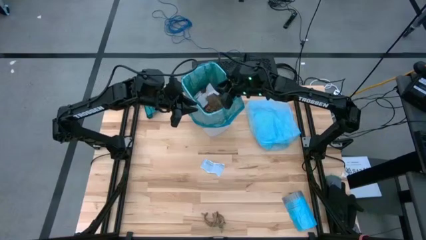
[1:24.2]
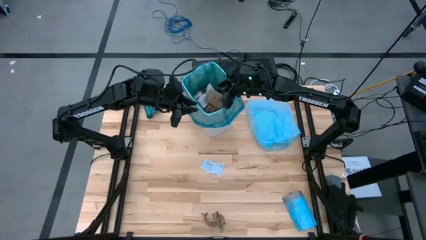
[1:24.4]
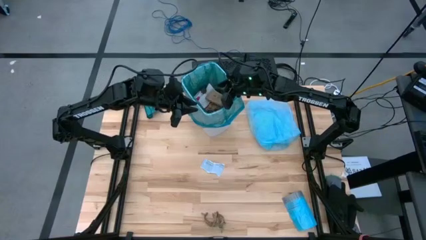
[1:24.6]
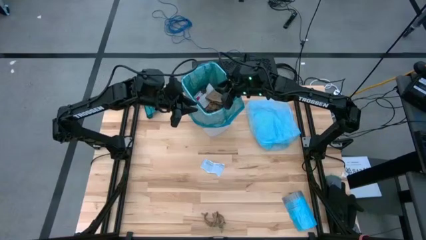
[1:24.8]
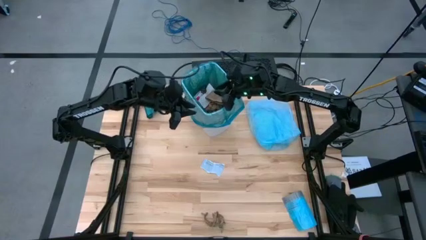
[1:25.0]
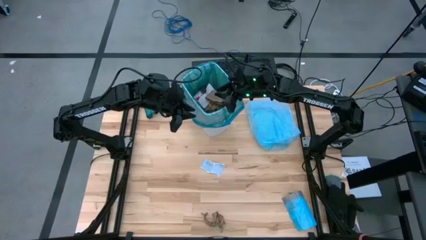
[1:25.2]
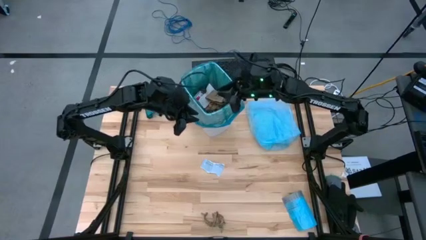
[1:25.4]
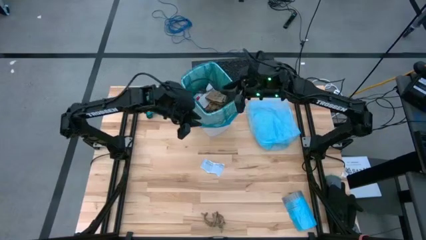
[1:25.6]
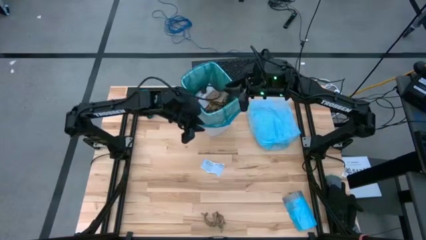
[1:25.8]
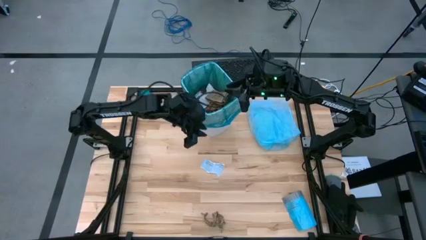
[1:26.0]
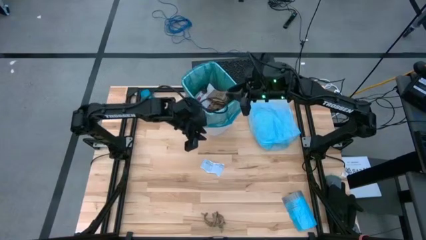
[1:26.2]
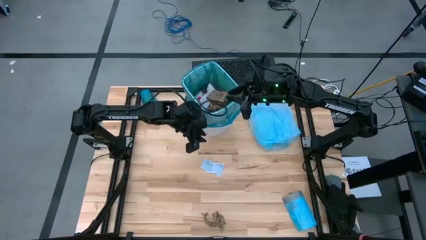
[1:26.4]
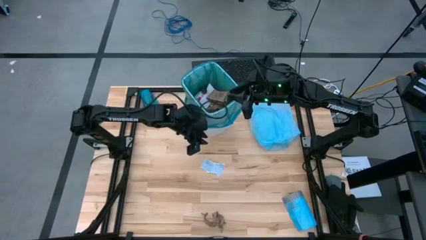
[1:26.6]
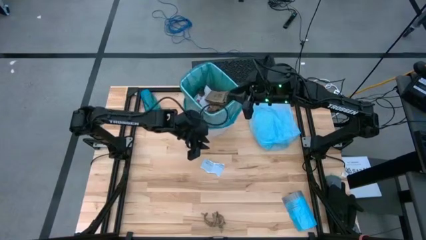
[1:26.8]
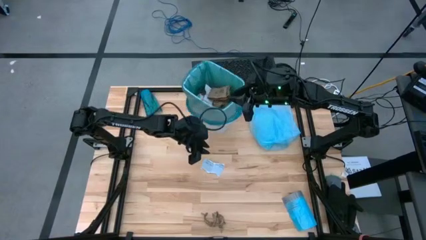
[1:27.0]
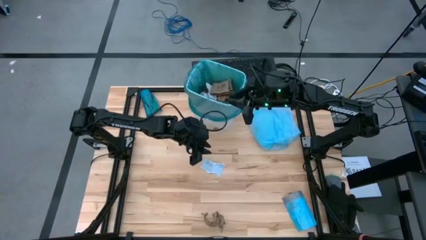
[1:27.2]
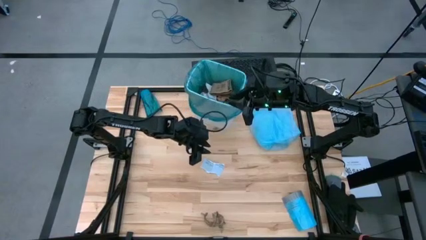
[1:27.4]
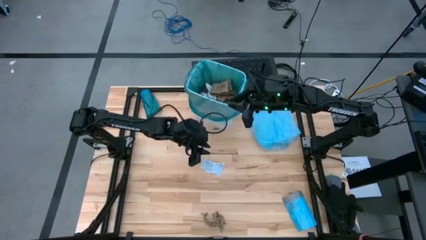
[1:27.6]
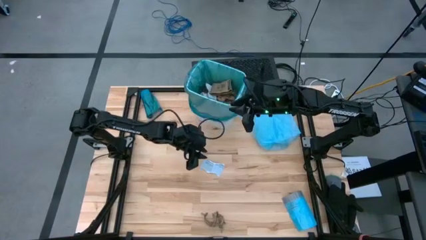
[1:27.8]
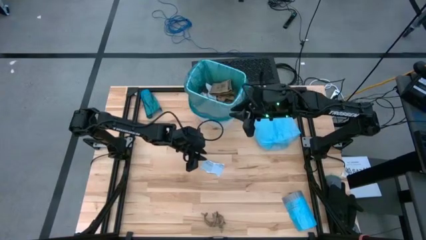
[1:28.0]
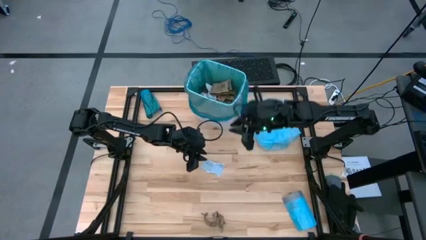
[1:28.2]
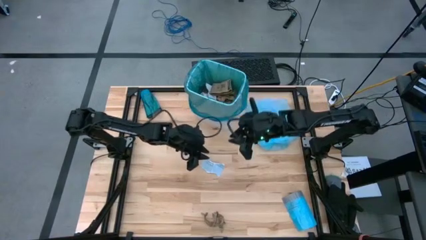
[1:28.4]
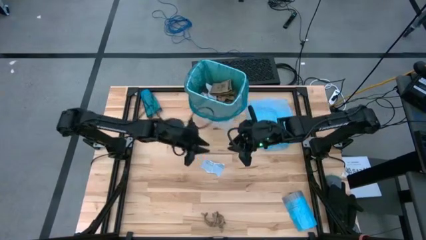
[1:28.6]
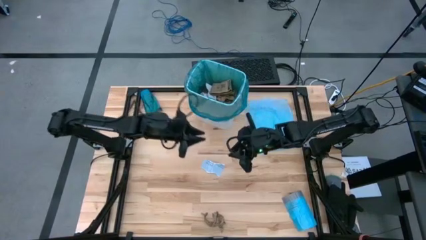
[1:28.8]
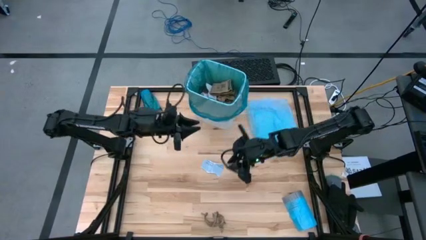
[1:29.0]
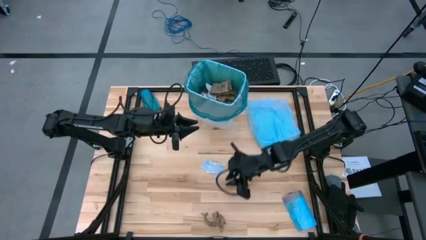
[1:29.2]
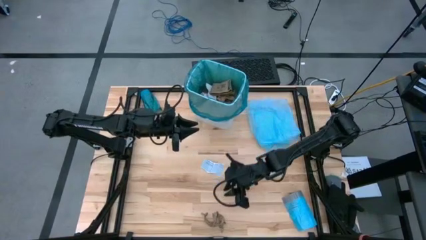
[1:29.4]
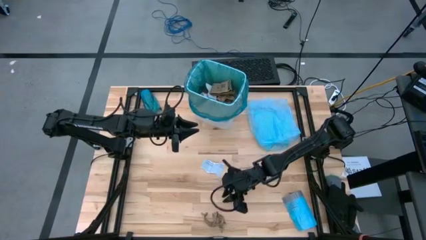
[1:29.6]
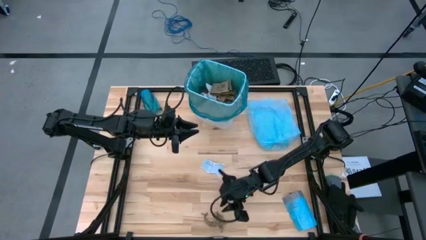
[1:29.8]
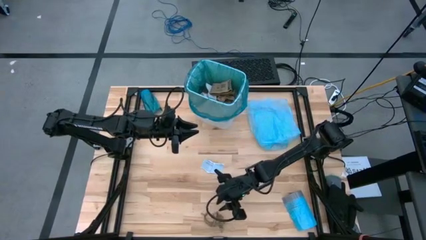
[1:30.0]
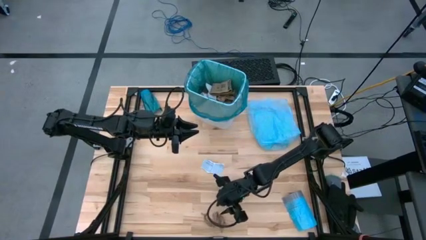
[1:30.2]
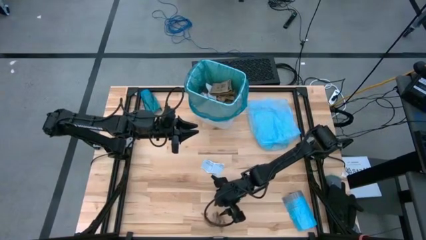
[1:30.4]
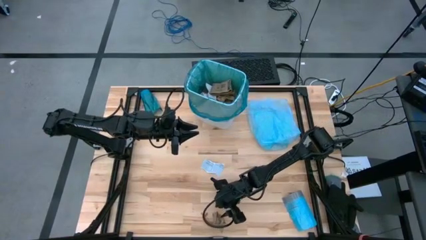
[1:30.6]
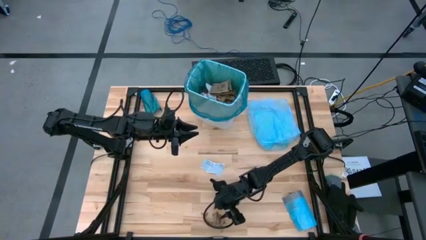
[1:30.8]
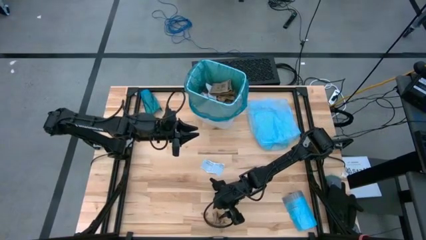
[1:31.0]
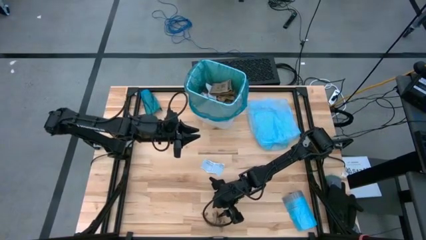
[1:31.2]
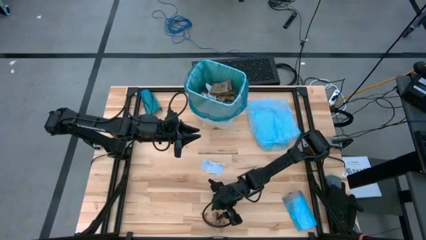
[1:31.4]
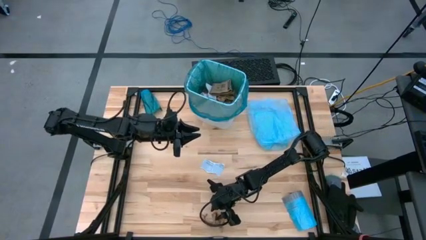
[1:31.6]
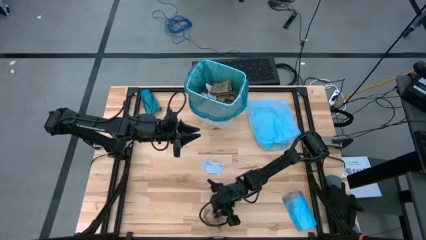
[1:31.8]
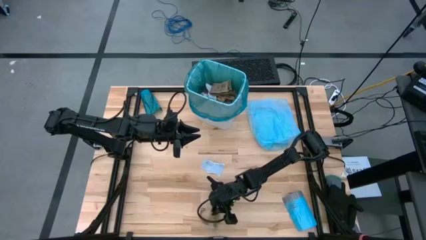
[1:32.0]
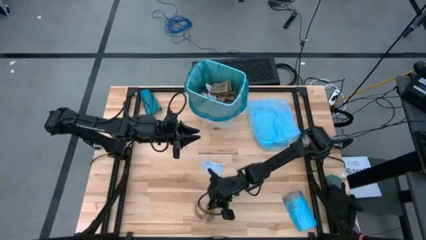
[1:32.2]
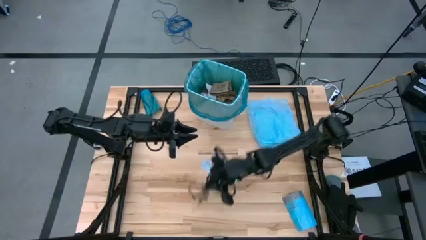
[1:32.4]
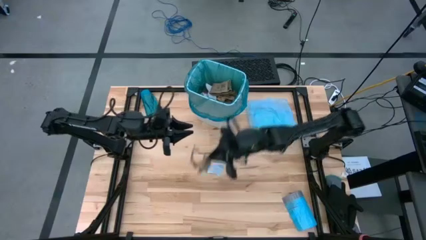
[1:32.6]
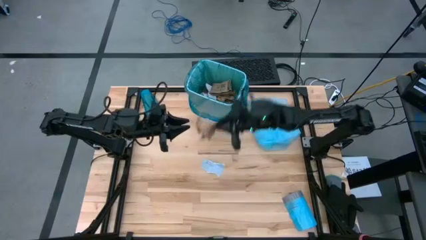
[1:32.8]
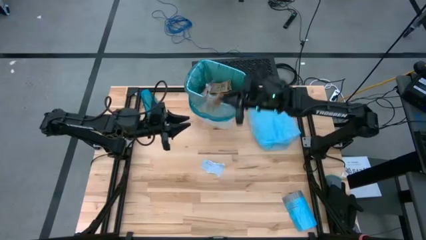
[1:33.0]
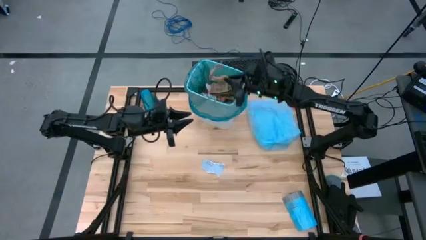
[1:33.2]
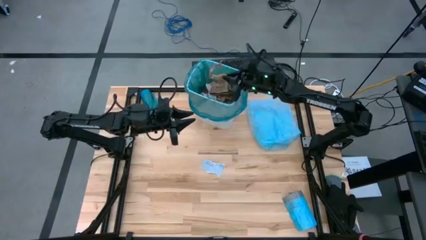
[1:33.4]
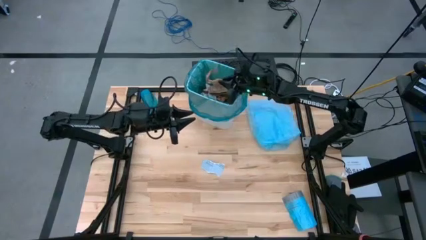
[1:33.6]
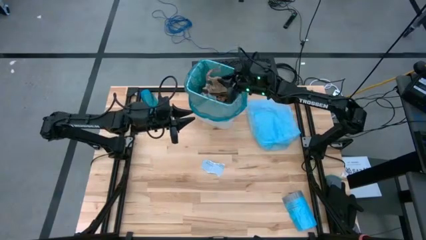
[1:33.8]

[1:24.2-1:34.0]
Task: place trash/remove bag and relplace
Put the brown paper into the blue trash bag inside the white trash bin

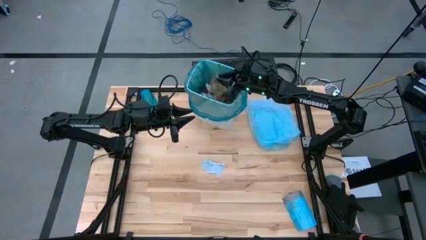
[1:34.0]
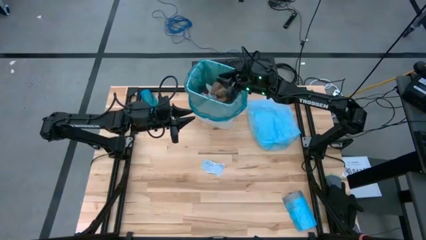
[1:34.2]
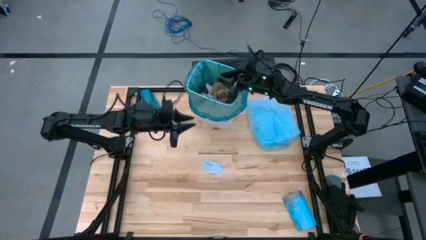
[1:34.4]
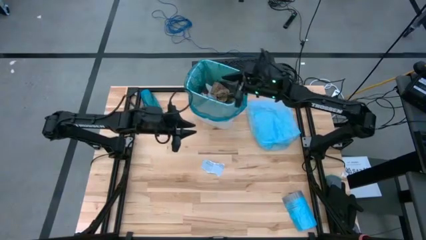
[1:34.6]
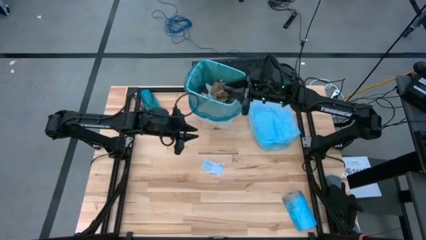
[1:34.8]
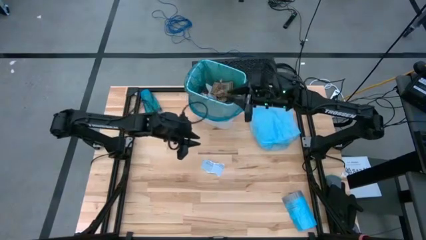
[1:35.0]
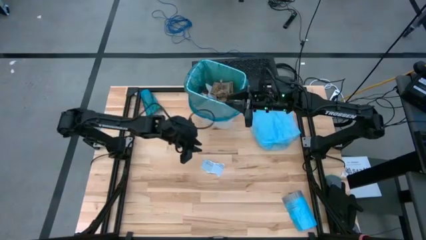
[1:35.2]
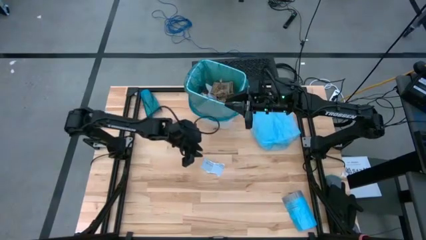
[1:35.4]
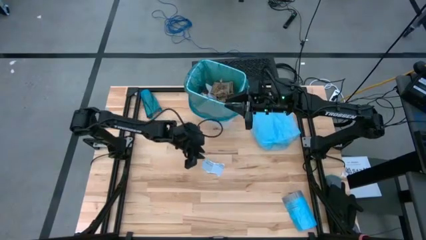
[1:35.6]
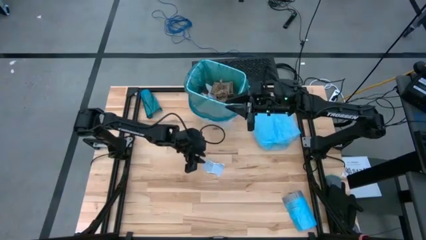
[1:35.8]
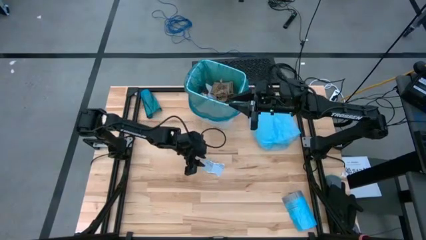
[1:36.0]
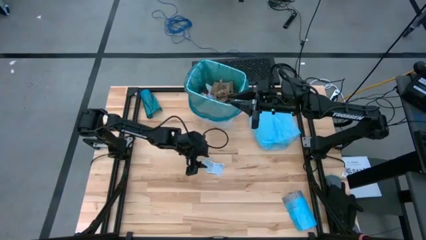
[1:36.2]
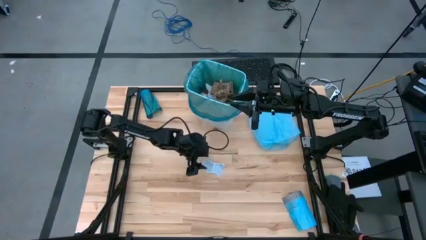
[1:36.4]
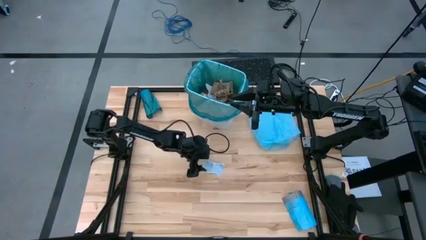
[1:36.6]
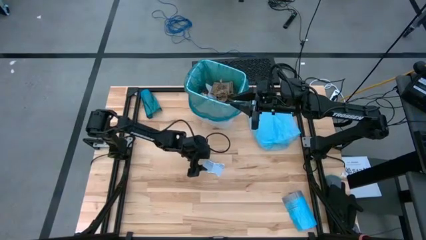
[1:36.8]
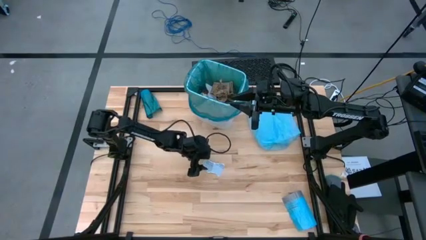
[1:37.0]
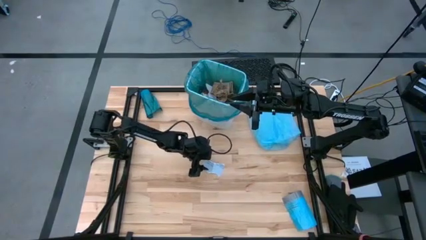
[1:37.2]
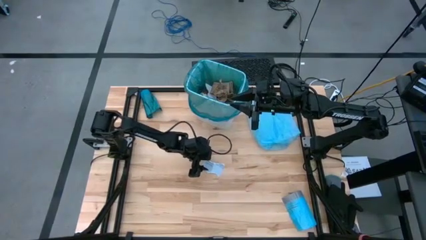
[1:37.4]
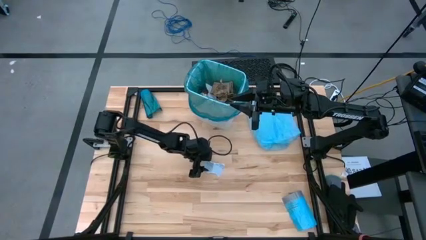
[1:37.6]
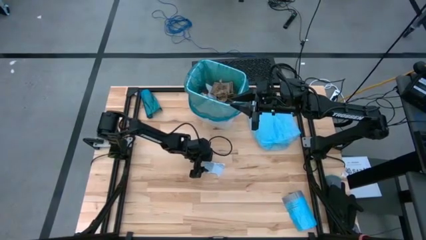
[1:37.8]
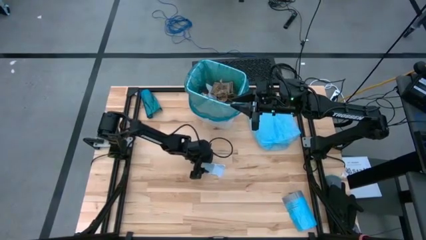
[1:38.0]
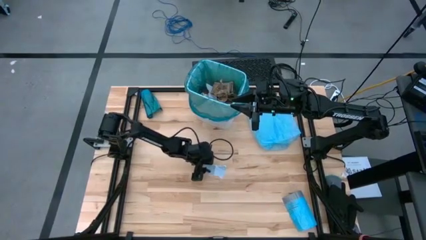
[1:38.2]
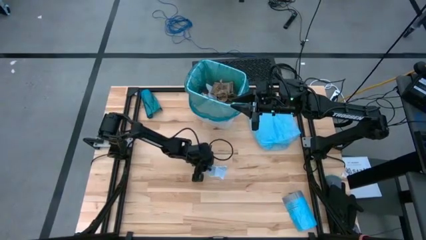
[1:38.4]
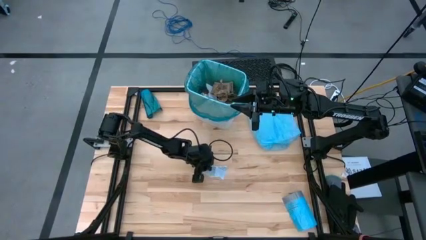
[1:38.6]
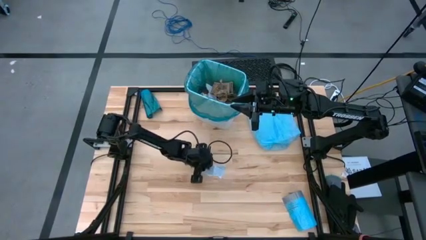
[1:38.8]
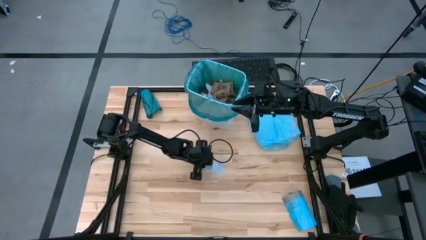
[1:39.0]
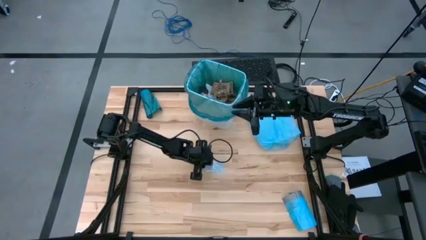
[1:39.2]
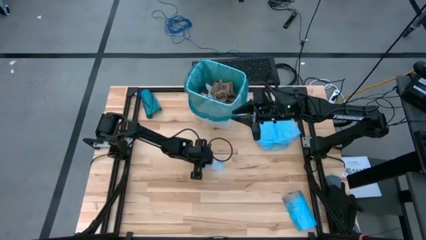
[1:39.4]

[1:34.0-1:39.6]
Put the white paper into the blue trash bag inside the white trash bin
